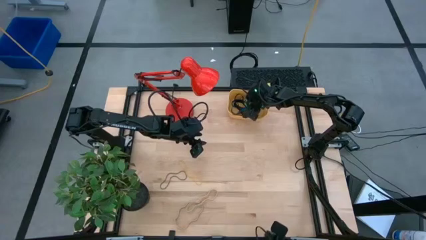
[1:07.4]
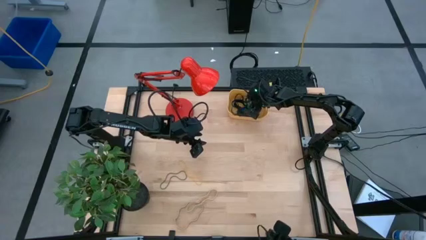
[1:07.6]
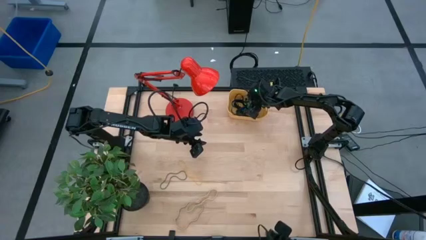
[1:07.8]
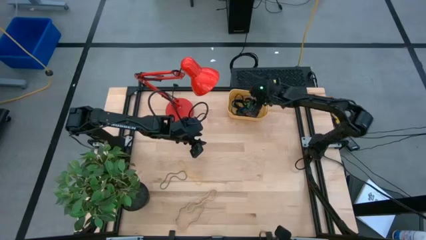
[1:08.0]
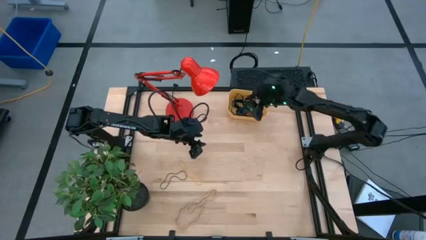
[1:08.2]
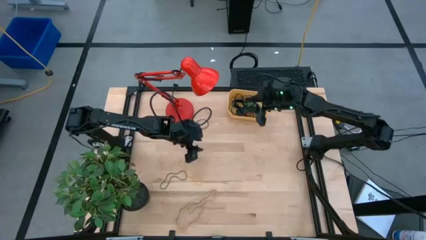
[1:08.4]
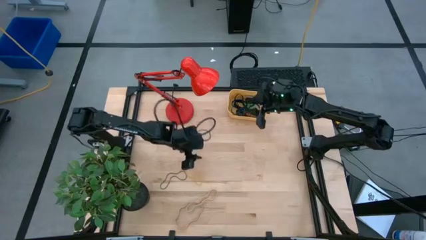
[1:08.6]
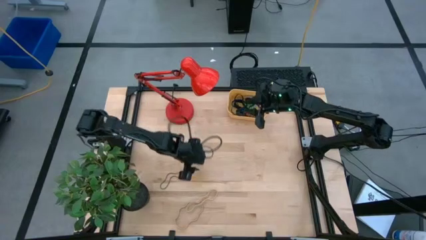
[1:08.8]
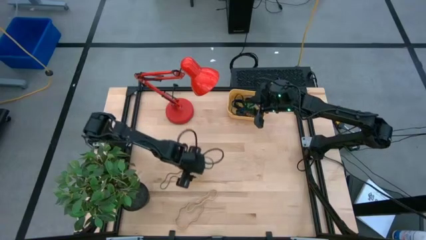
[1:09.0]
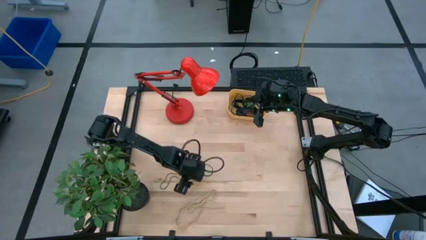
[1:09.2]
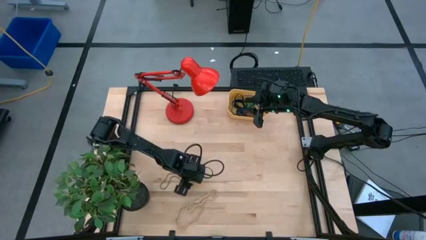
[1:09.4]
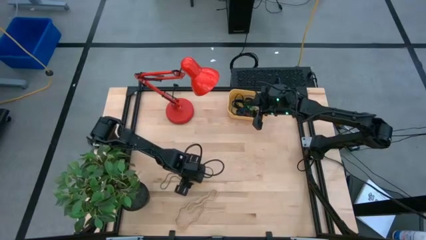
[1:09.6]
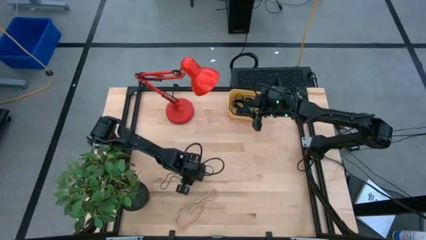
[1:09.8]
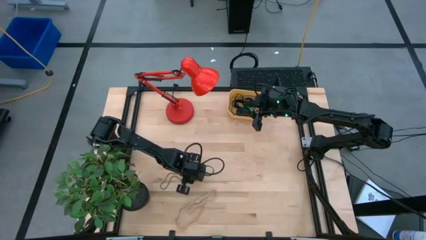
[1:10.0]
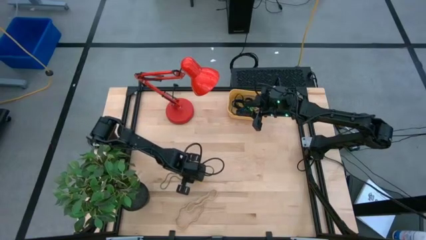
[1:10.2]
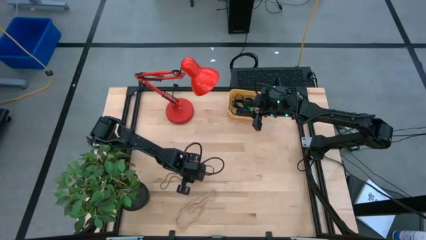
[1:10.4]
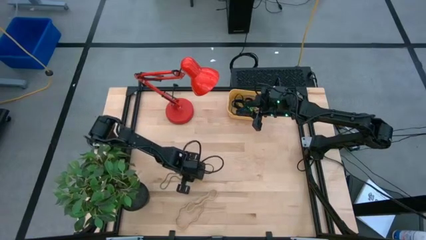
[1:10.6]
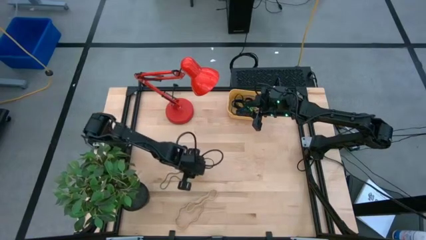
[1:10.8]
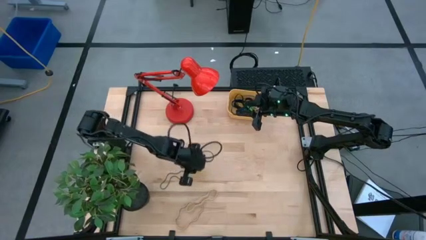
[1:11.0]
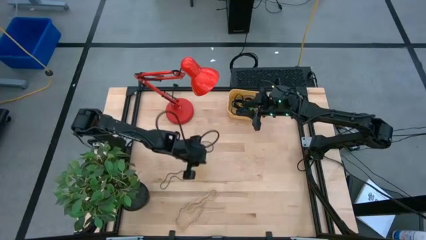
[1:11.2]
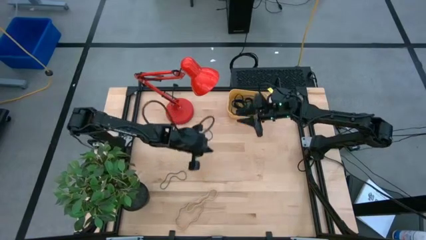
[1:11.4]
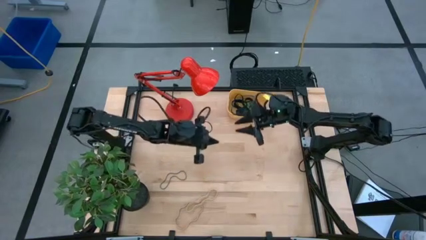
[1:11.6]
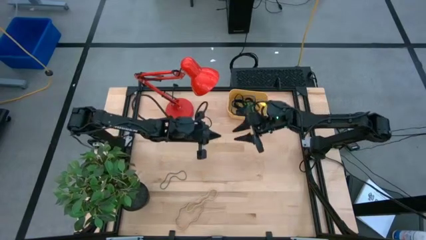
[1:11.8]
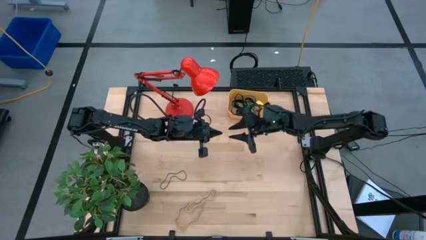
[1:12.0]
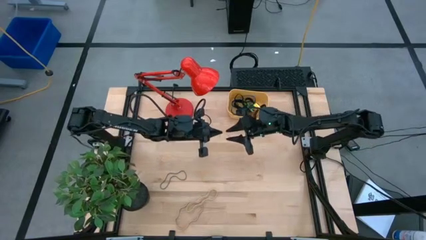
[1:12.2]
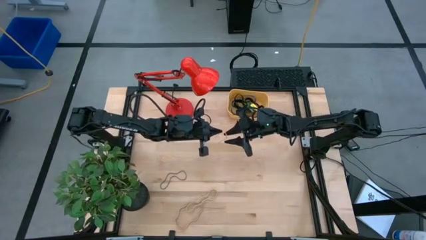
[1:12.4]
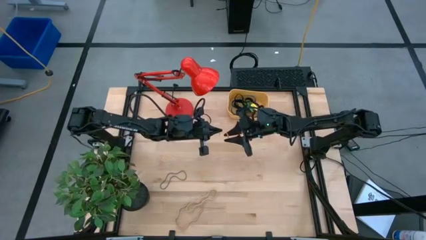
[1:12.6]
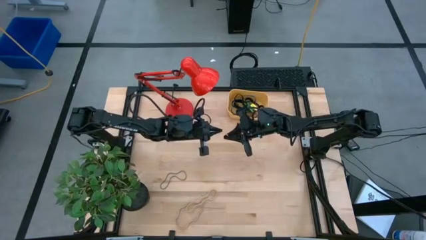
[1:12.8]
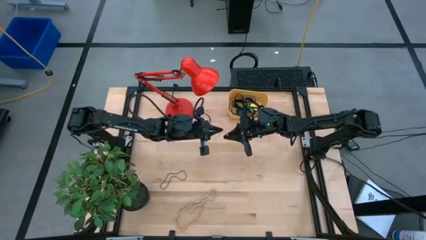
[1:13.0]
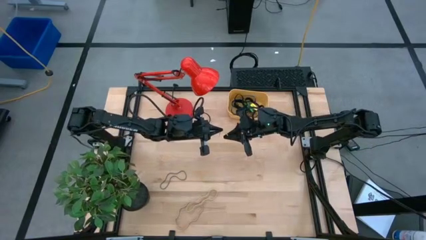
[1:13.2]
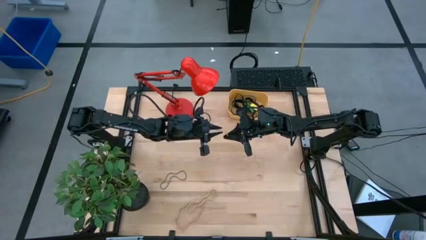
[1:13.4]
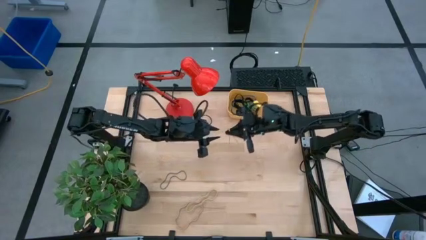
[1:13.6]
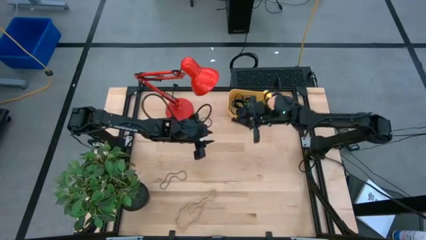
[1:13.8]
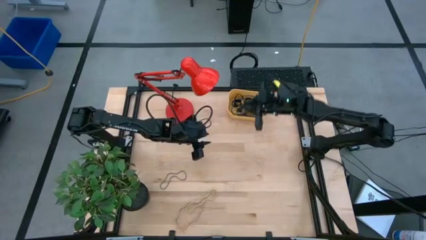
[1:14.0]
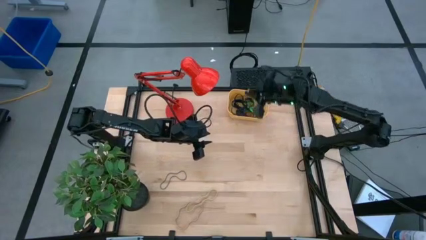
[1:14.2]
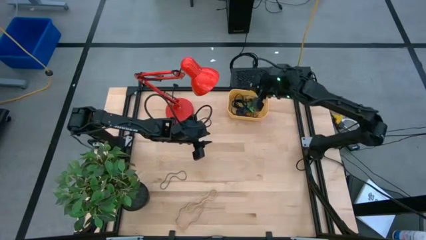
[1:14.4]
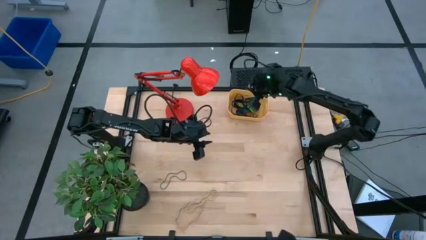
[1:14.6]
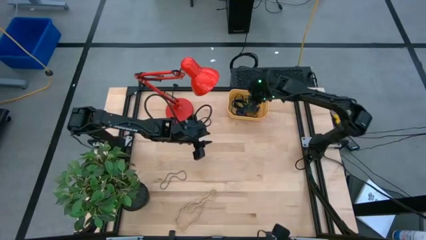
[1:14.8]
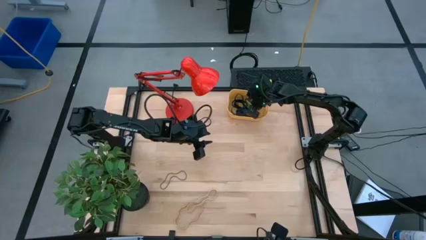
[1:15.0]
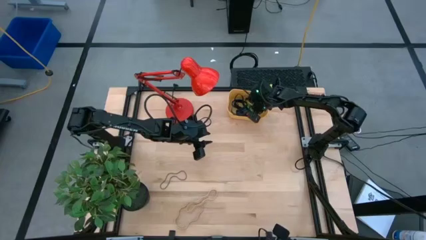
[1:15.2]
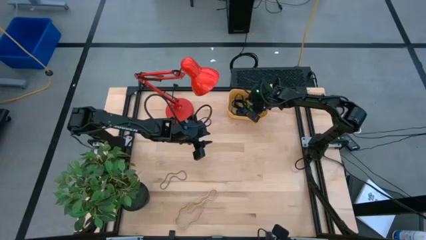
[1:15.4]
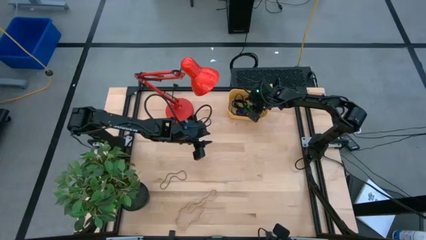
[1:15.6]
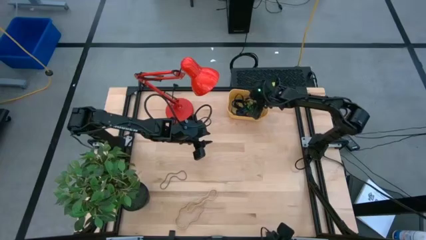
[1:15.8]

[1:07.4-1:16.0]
Task: Pick and place rubber bands into bin
Put the yellow rubber band into the yellow container

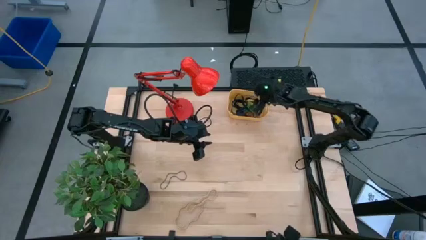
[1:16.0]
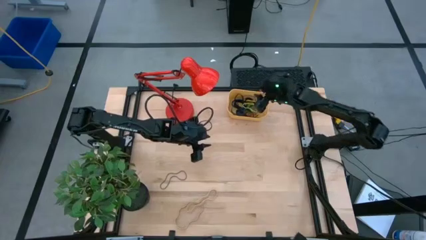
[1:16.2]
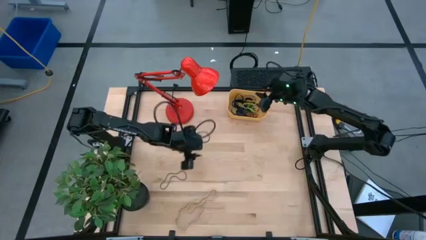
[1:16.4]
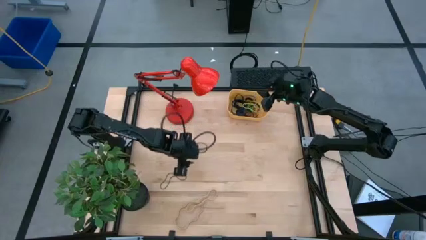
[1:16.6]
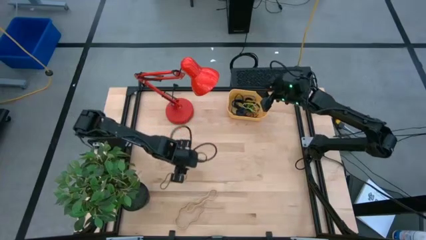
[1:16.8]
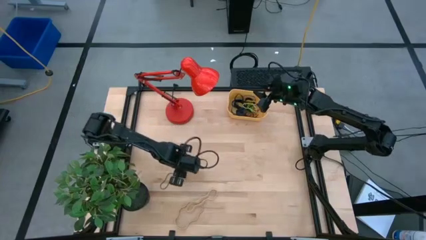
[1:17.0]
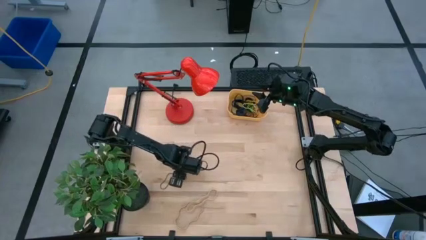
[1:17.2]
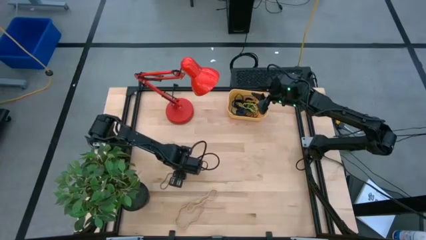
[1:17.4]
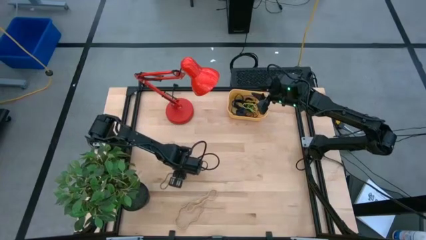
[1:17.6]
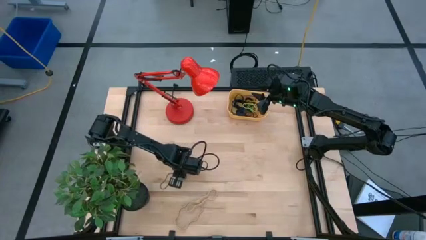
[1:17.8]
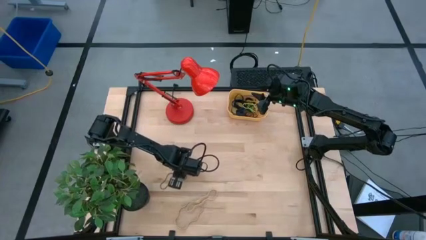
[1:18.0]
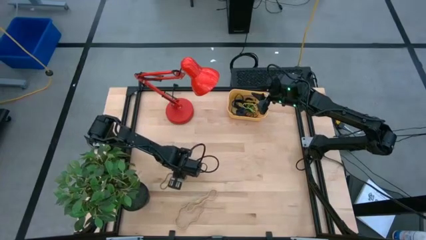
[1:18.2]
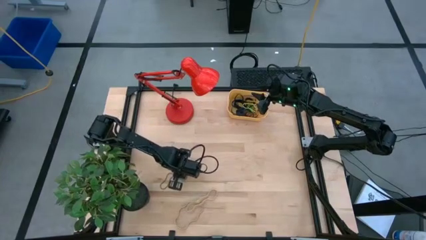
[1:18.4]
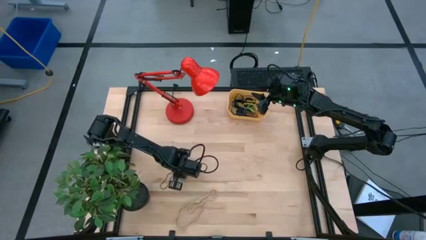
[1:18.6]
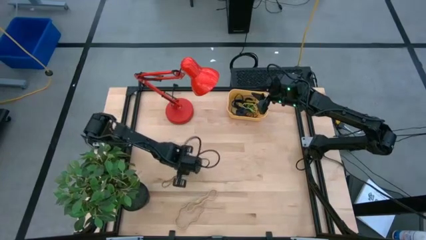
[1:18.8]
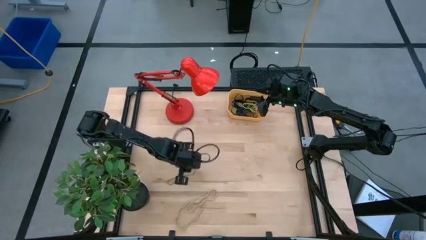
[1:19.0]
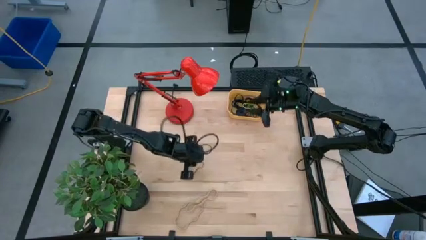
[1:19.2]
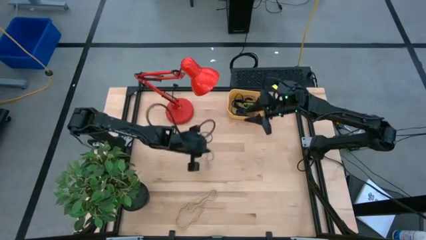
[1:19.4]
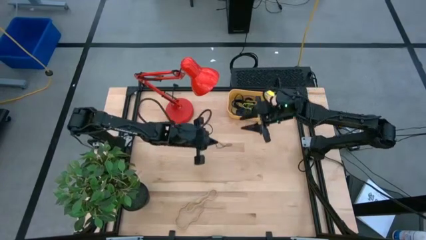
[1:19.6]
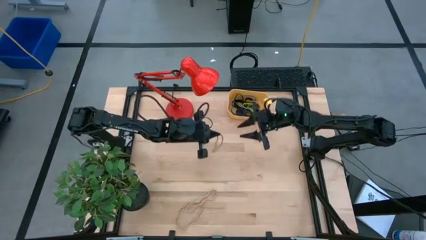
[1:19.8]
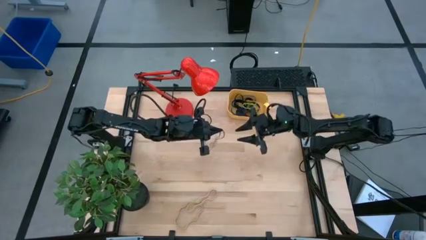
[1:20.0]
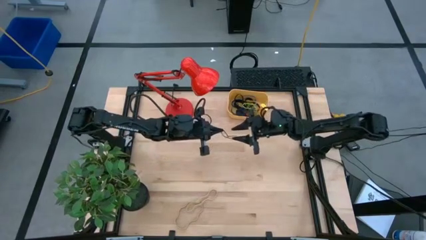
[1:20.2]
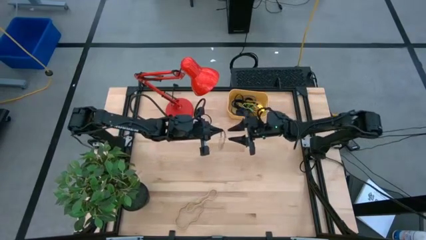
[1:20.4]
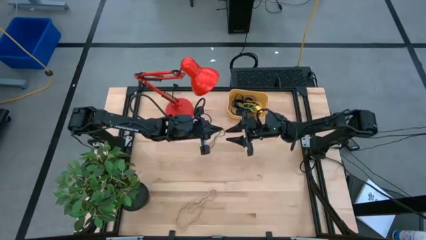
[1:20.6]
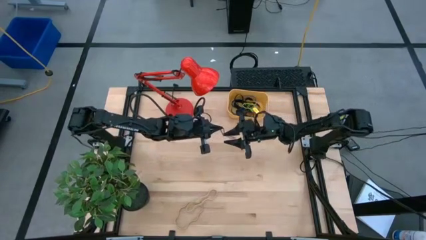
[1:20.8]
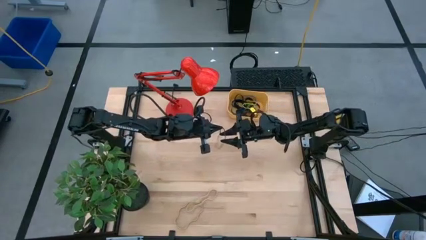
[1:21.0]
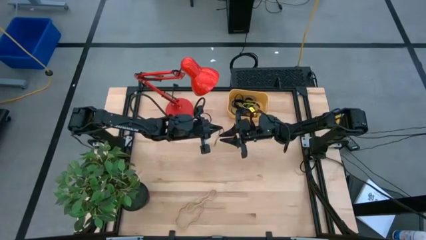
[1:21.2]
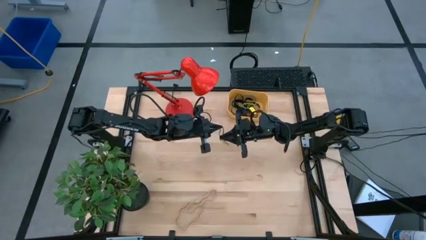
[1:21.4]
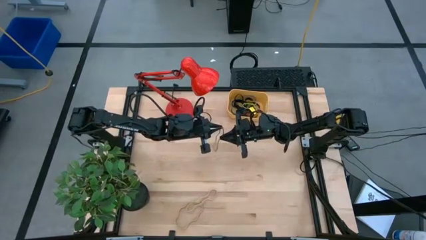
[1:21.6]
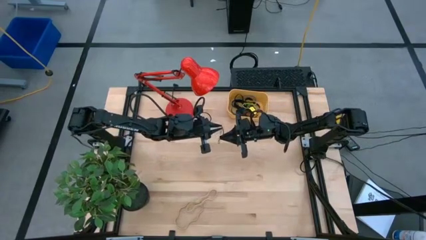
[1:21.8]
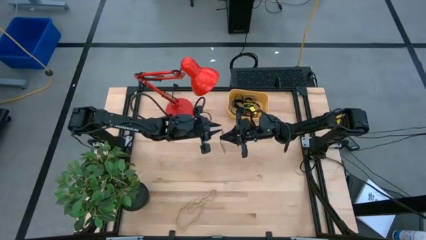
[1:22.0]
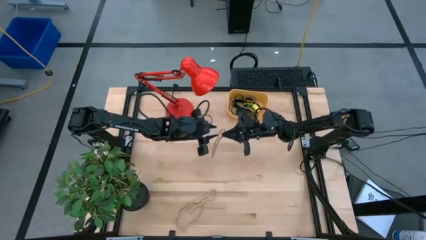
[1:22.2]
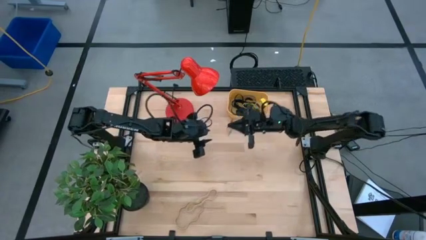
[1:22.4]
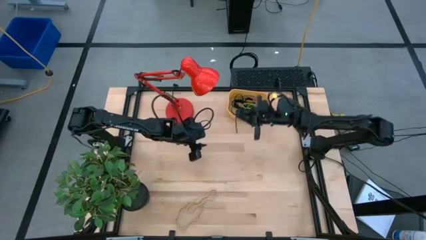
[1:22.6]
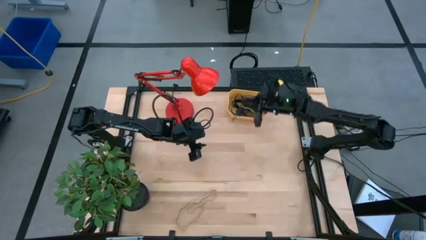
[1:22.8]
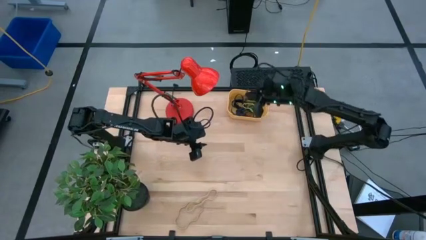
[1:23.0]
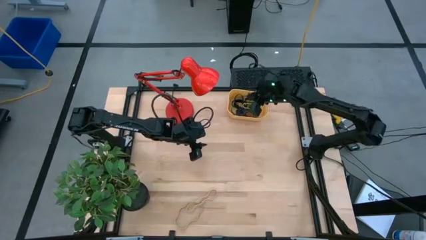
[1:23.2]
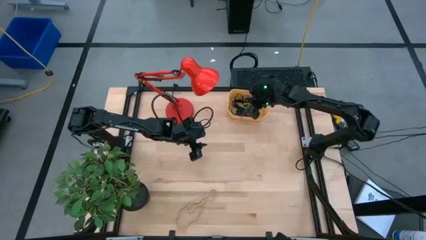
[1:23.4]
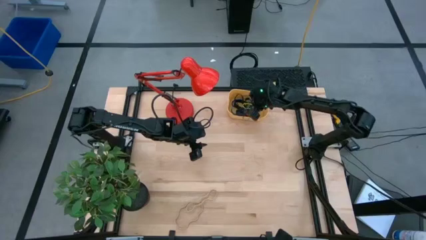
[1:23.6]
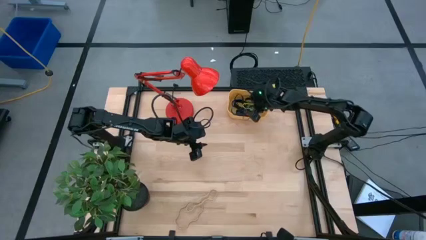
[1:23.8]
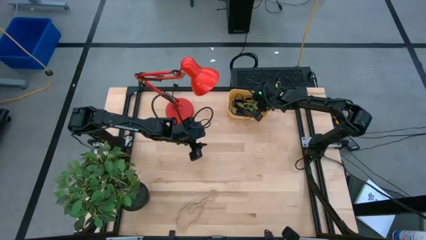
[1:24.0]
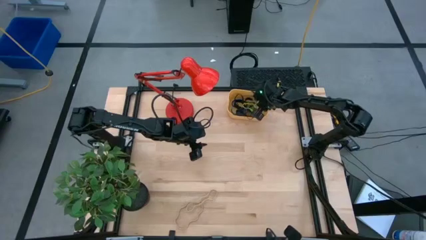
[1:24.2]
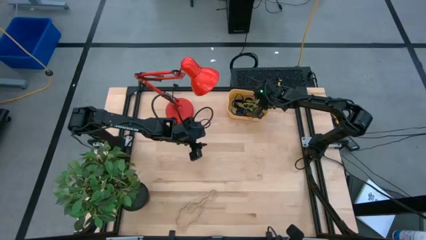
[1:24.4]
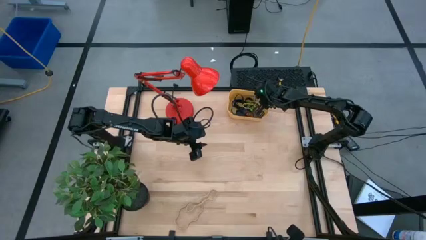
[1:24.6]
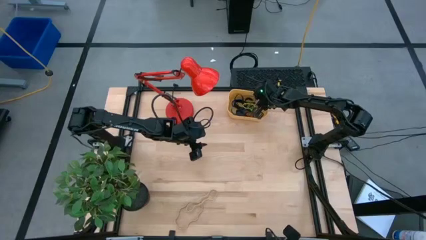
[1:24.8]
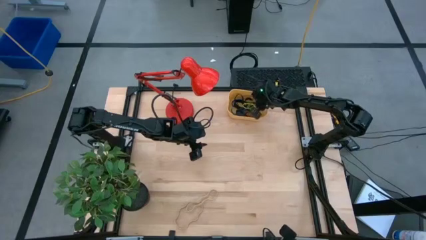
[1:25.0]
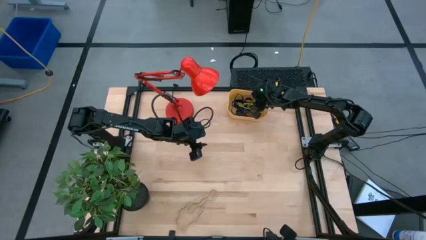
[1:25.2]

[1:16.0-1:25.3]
Put the purple rubber band into the yellow container
